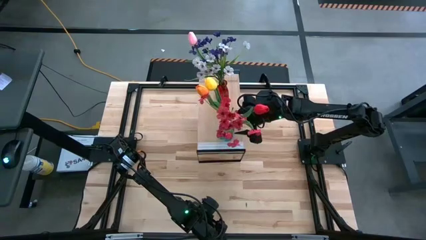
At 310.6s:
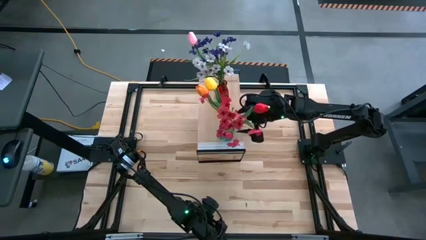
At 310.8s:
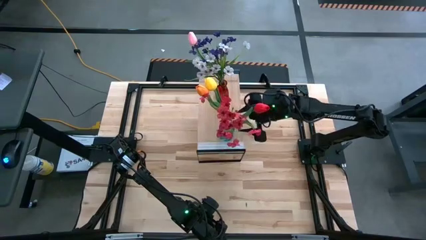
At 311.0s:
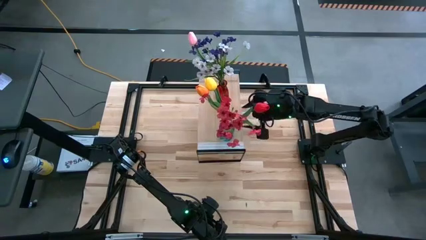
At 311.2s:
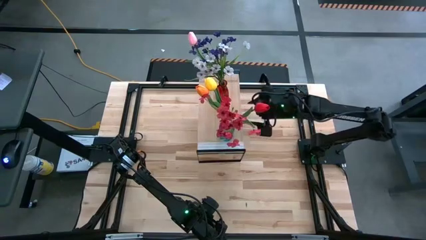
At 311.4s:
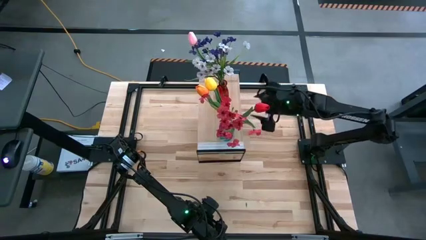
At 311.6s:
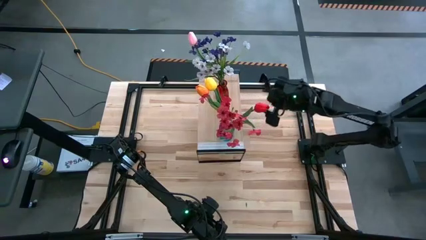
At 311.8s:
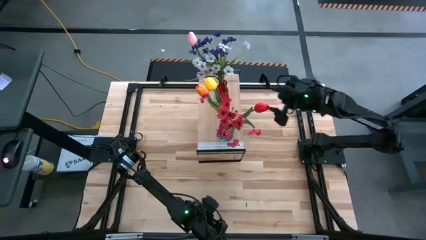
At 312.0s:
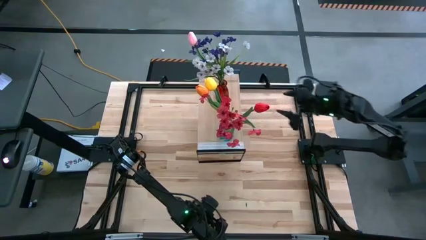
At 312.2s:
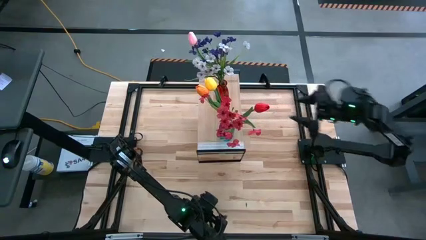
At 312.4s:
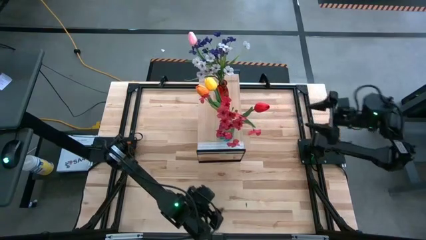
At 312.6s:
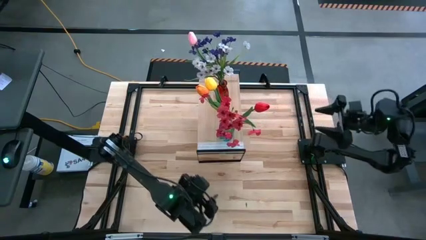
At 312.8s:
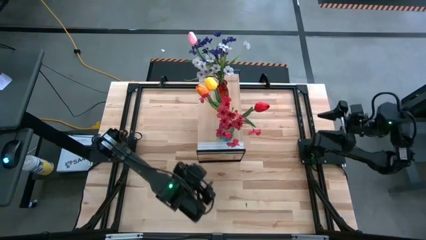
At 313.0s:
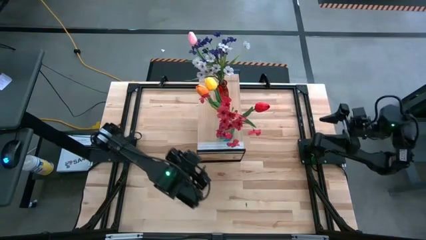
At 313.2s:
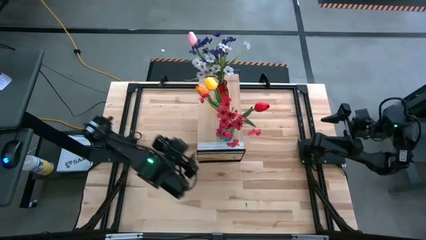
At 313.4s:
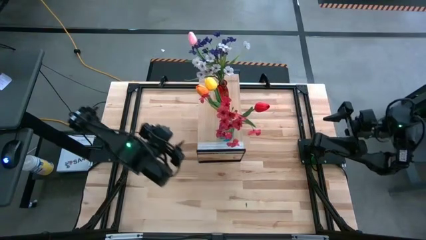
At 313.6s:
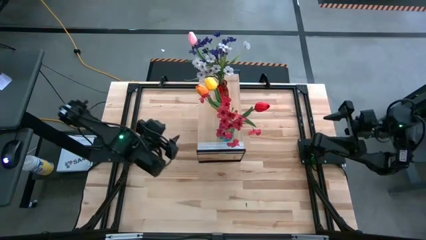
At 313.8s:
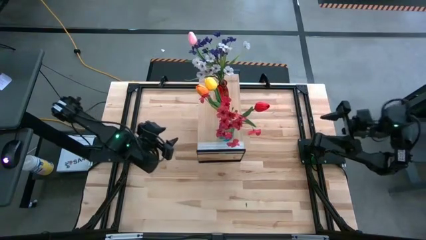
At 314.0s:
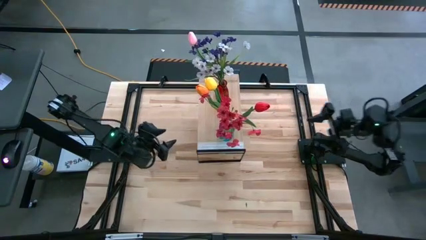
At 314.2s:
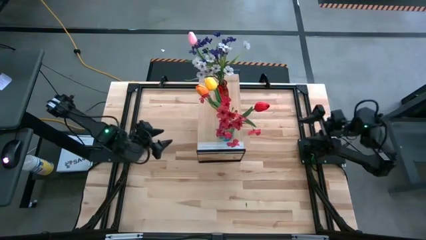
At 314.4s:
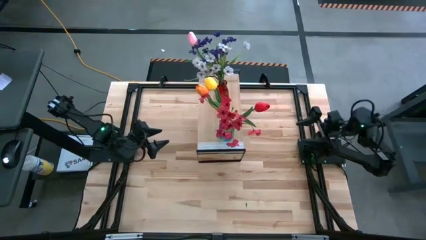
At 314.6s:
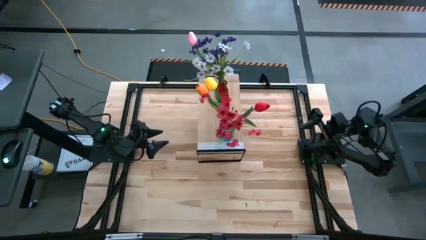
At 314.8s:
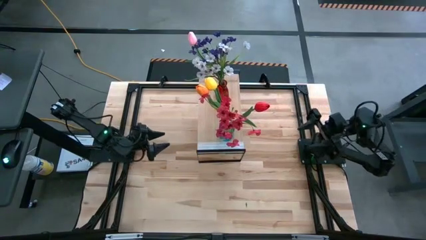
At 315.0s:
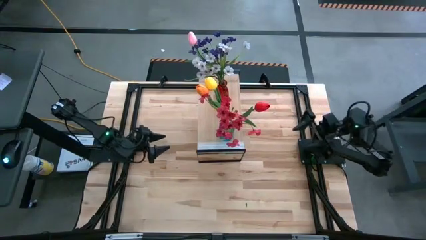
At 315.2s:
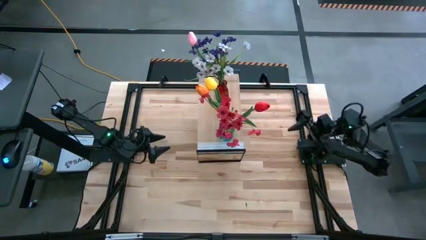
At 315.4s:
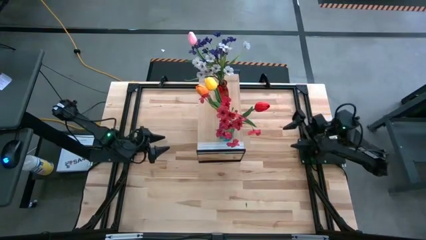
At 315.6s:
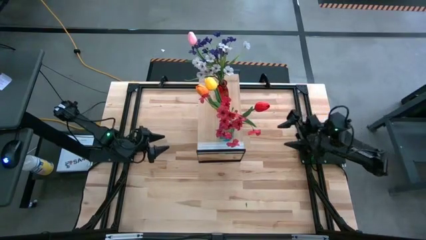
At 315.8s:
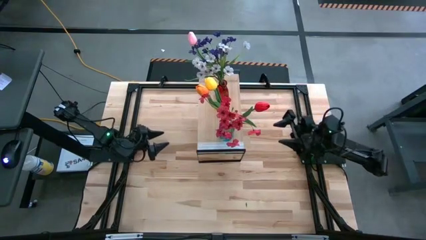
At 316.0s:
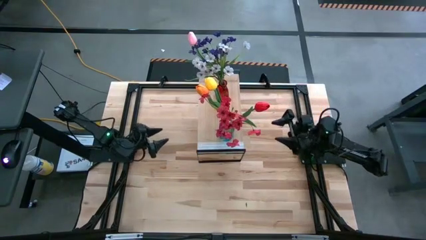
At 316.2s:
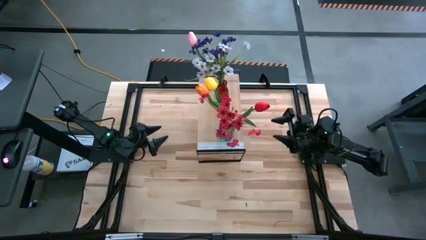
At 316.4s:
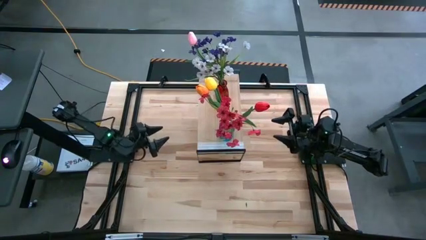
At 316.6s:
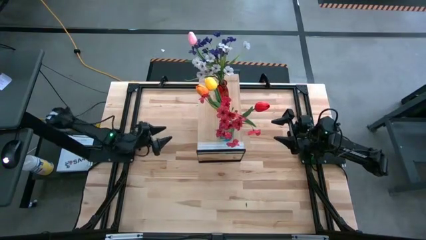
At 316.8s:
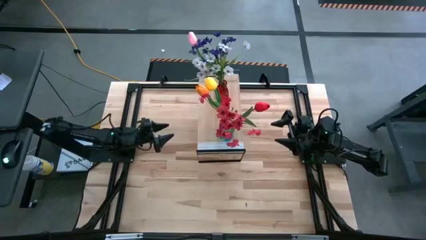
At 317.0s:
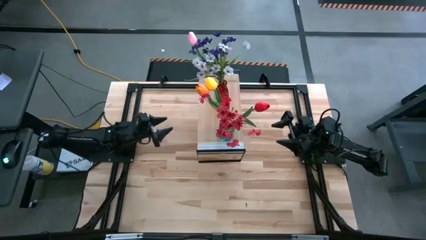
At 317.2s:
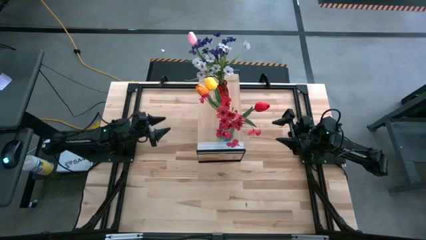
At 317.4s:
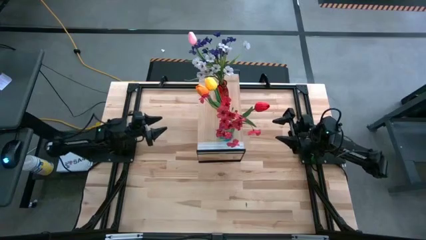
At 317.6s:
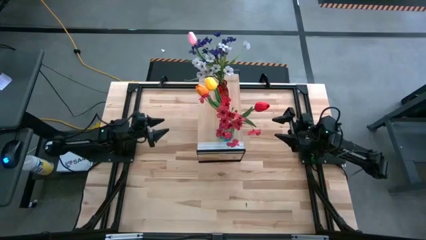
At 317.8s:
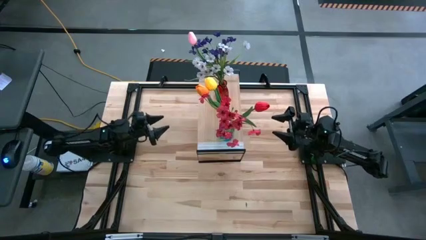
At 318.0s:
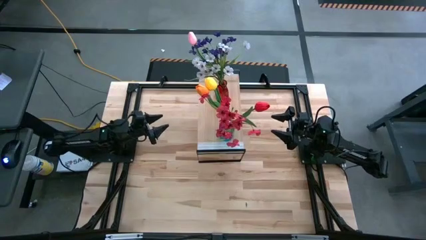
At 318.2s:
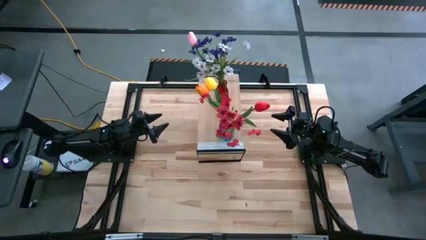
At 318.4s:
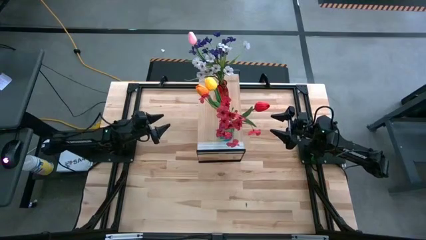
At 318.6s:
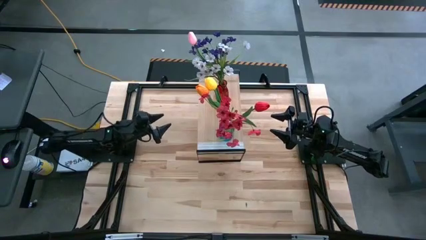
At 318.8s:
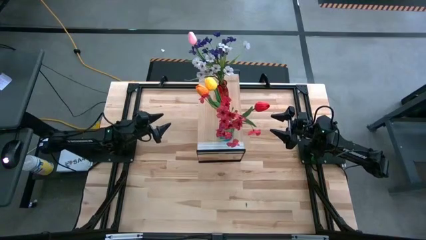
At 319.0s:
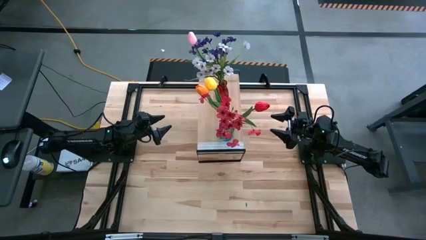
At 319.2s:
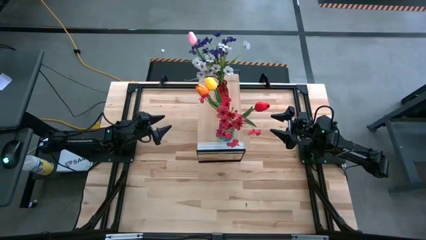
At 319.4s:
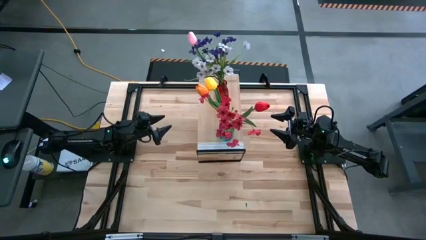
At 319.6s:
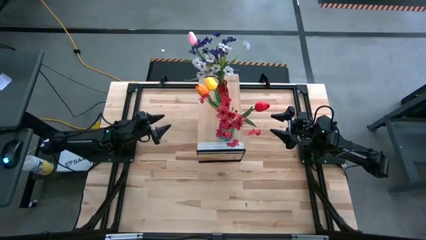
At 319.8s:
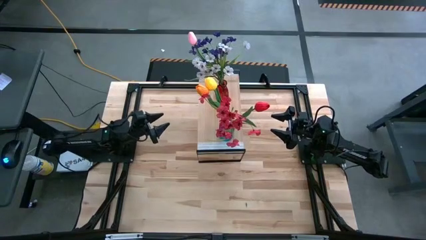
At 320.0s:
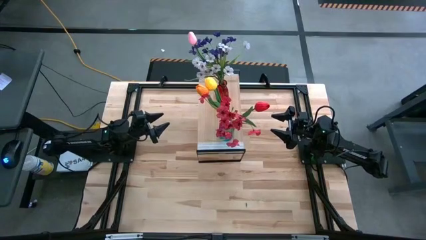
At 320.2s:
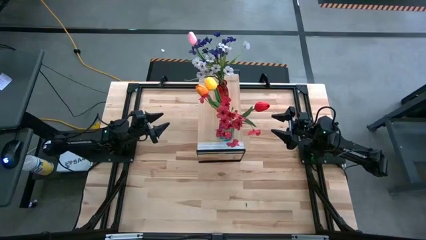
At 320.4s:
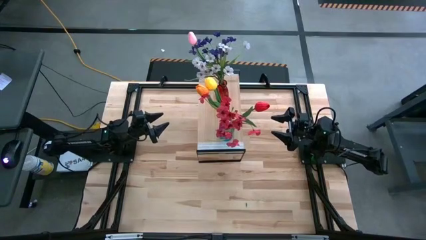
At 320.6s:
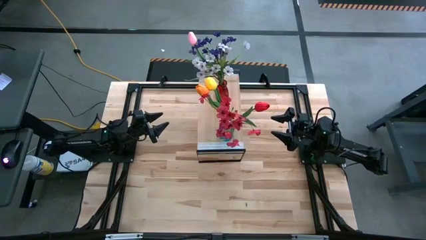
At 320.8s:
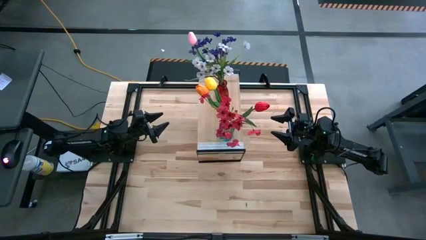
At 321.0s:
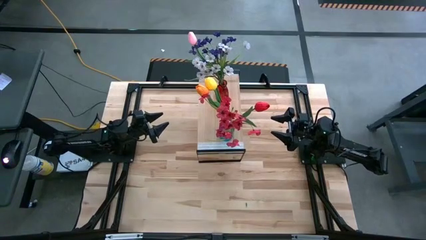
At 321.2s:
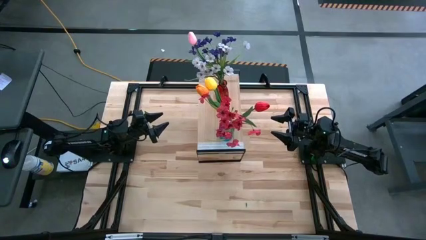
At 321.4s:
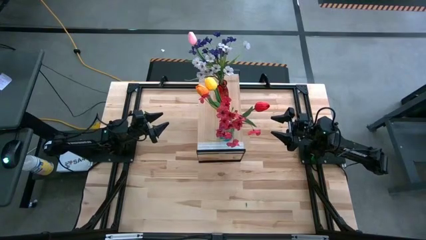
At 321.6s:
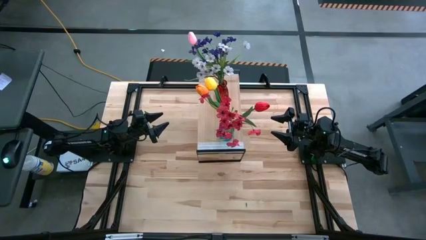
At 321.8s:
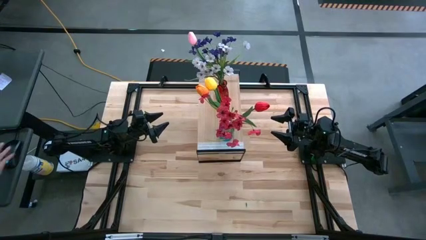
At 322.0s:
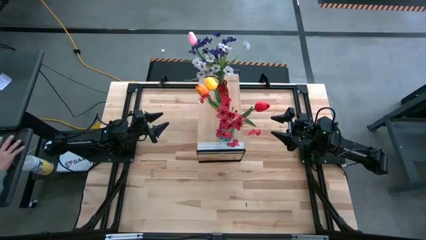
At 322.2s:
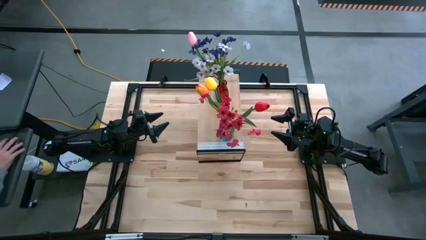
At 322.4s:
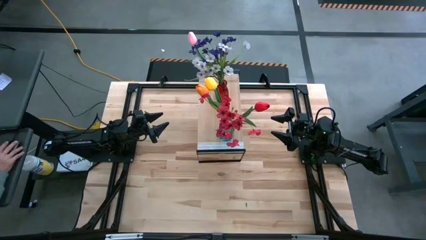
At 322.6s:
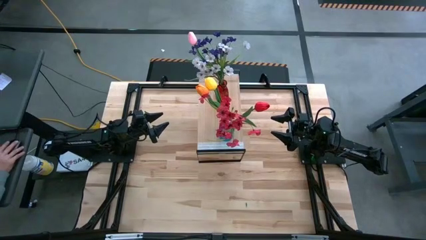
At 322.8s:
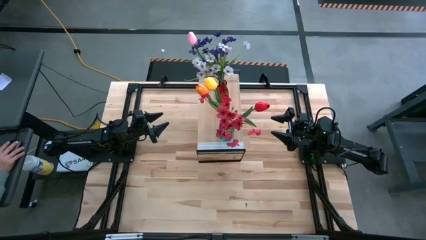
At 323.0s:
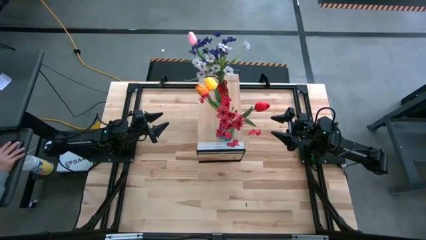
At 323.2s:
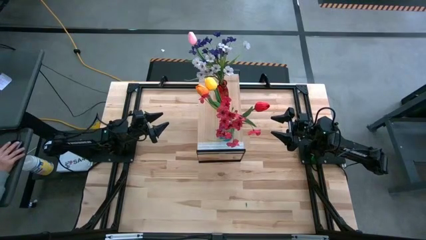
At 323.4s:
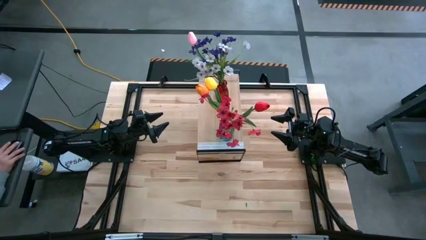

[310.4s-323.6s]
Task: Pick and place flowers into a vace then onto a shelf
Return to Home Position

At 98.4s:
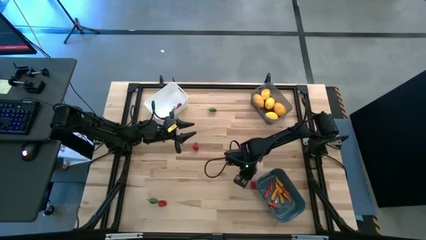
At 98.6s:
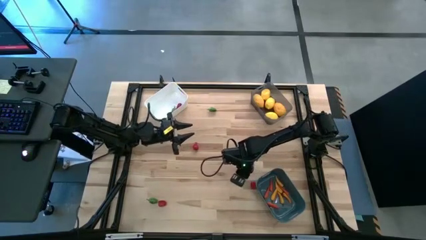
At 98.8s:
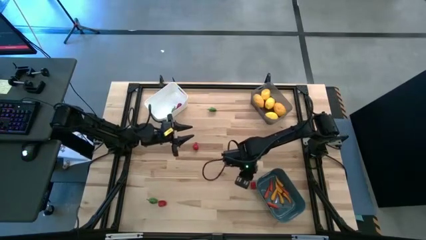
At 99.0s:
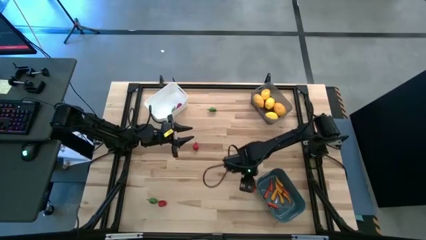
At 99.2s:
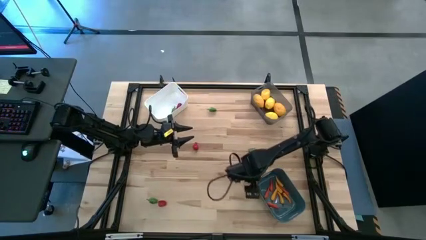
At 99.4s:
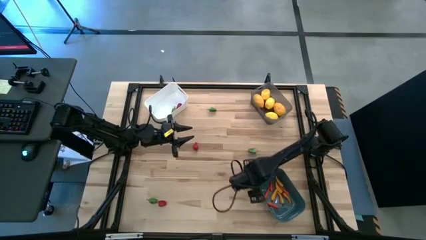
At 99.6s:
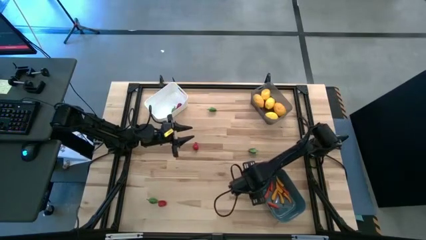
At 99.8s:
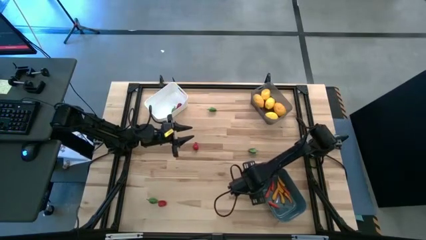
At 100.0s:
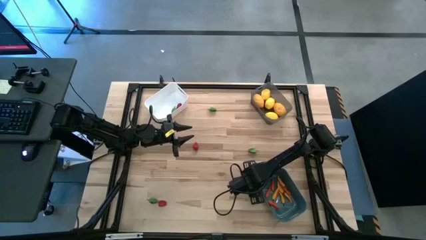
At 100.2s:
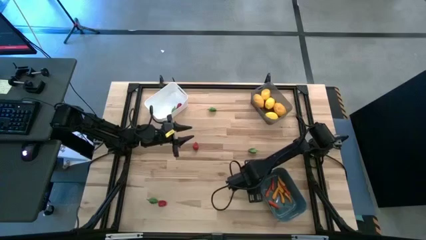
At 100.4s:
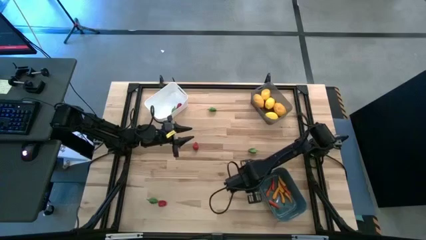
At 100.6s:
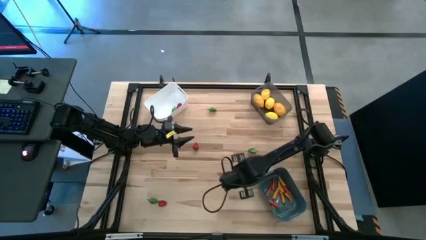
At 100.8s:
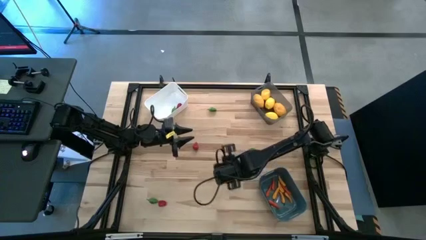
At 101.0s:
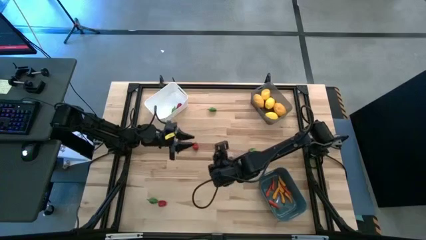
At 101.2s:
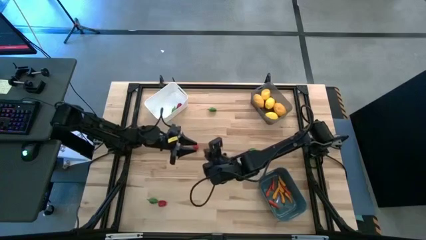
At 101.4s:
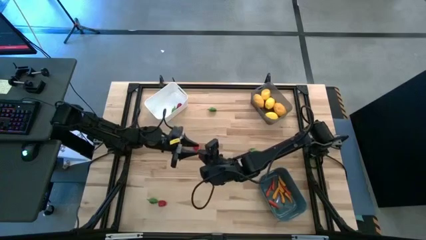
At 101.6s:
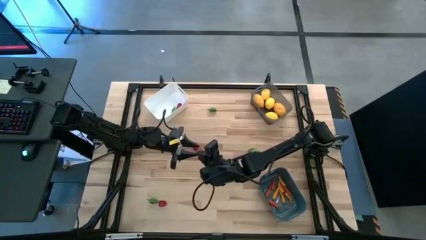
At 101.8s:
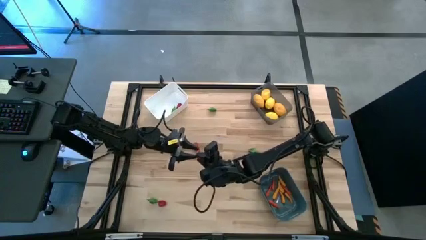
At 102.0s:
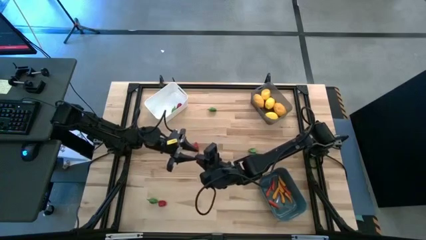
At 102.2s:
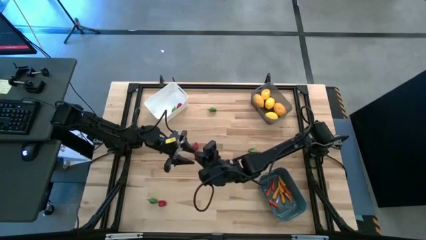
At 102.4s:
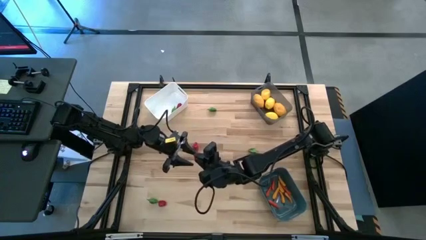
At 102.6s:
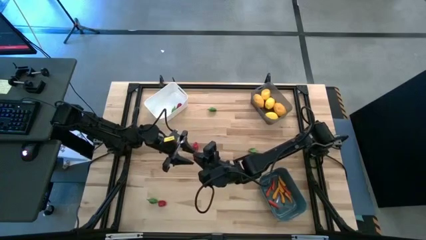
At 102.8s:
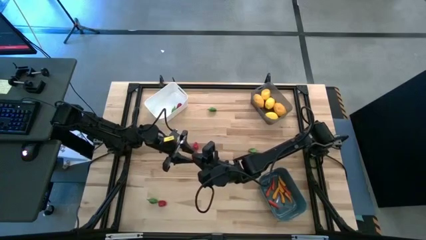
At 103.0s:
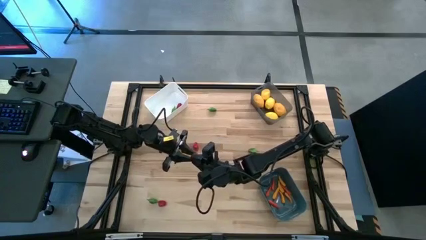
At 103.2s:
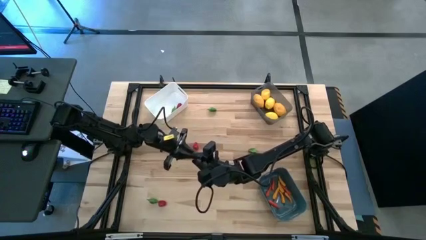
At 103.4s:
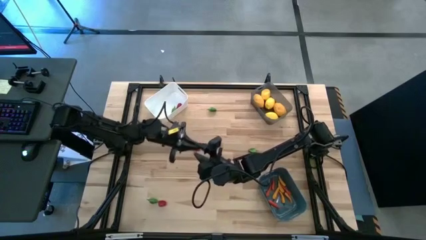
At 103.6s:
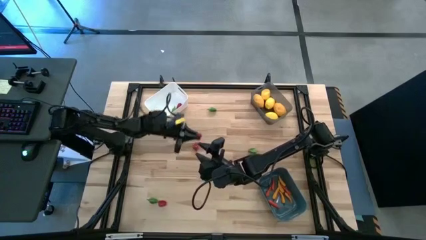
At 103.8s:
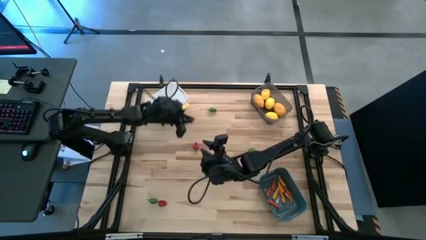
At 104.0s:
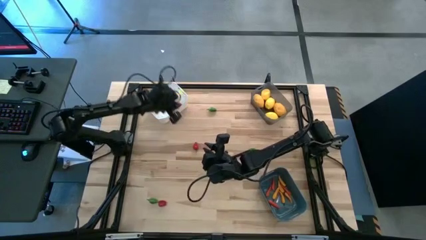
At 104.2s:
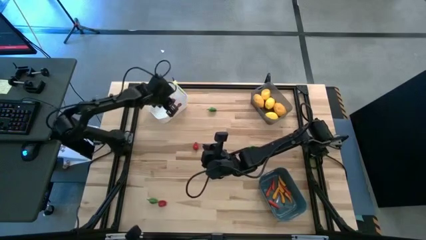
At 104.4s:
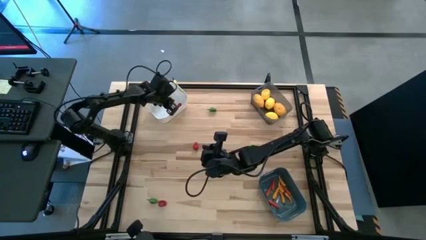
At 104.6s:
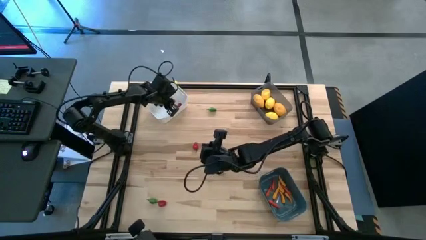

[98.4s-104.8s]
Task: Sort produce into baskets
Put the red chili pepper into the white bin
